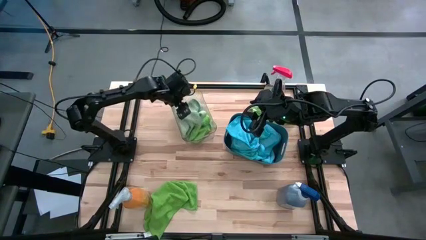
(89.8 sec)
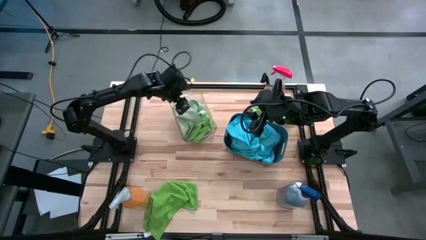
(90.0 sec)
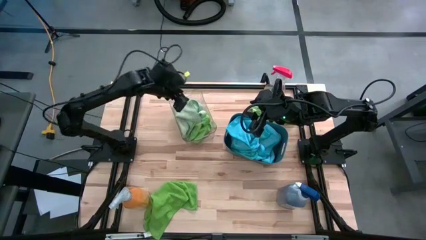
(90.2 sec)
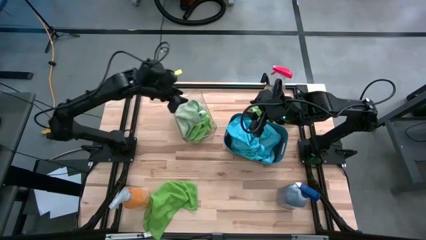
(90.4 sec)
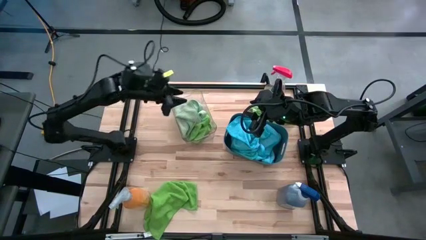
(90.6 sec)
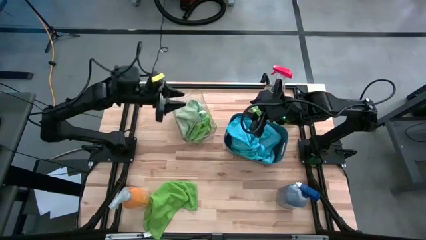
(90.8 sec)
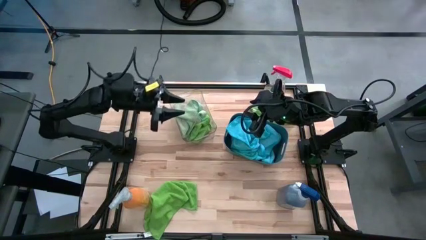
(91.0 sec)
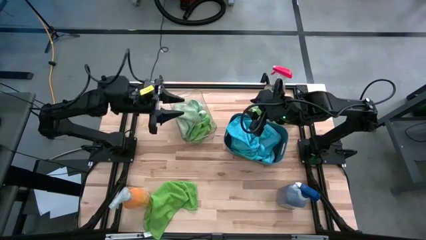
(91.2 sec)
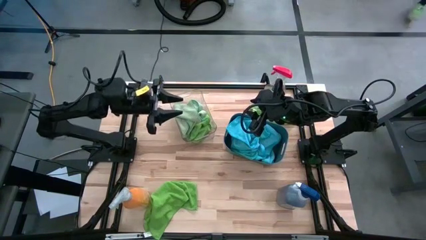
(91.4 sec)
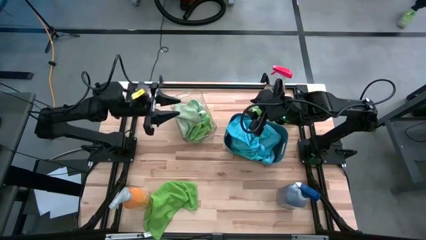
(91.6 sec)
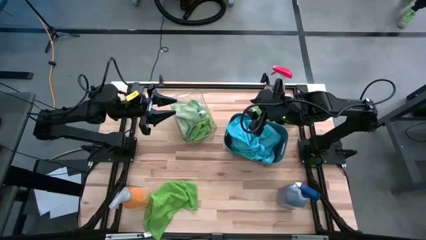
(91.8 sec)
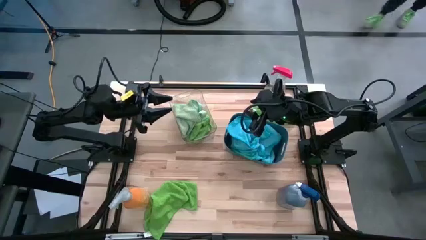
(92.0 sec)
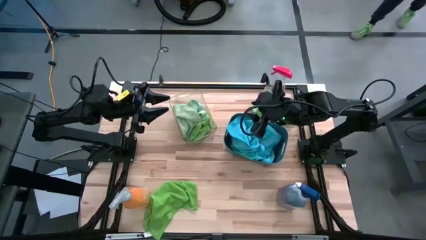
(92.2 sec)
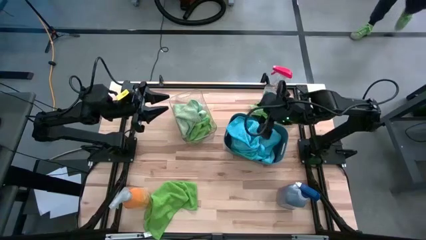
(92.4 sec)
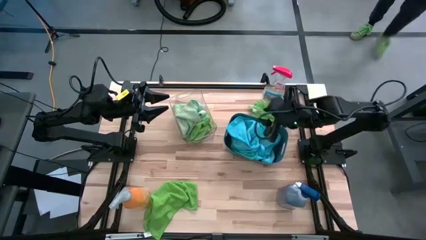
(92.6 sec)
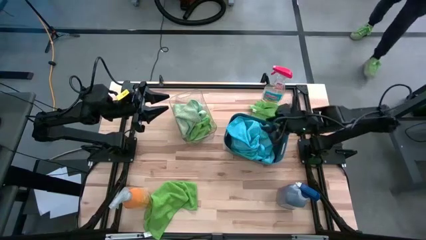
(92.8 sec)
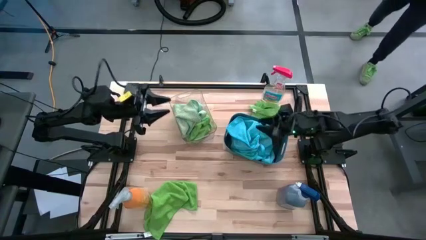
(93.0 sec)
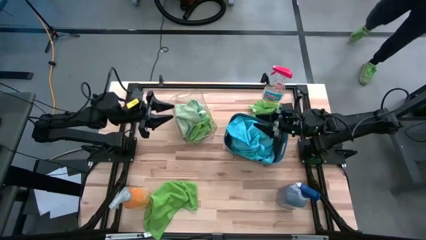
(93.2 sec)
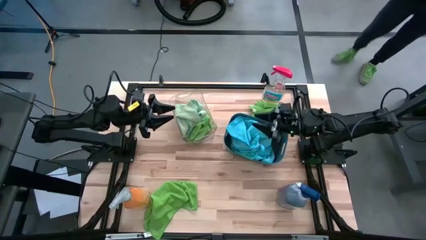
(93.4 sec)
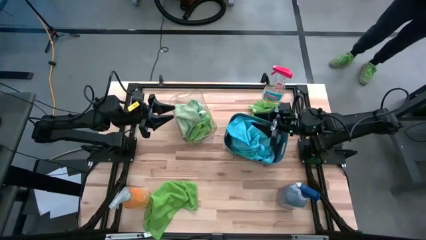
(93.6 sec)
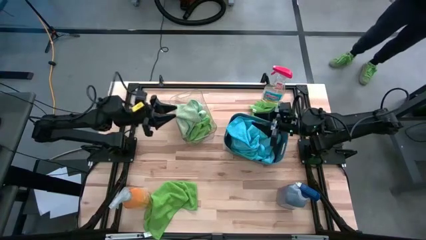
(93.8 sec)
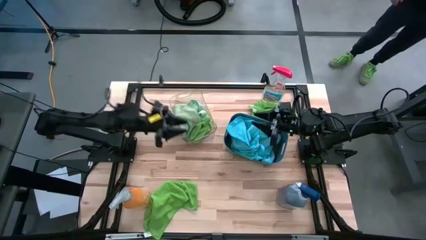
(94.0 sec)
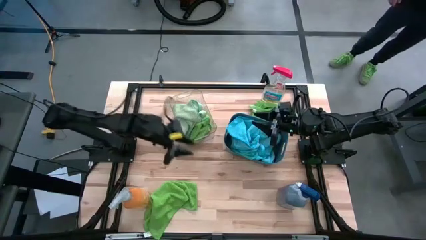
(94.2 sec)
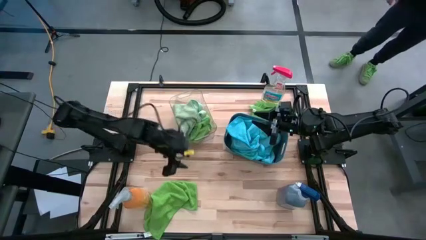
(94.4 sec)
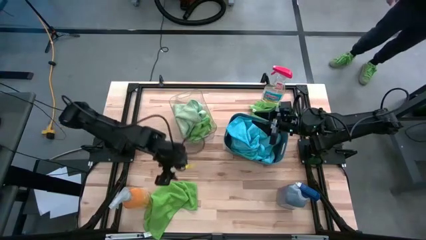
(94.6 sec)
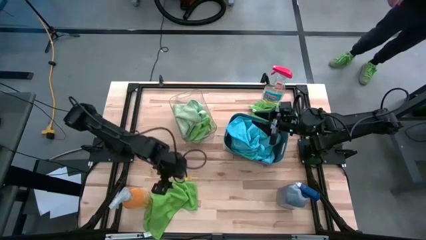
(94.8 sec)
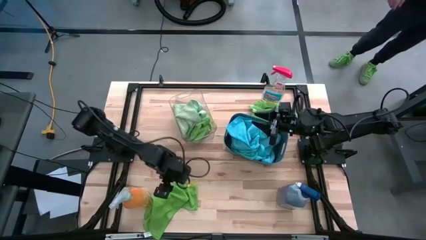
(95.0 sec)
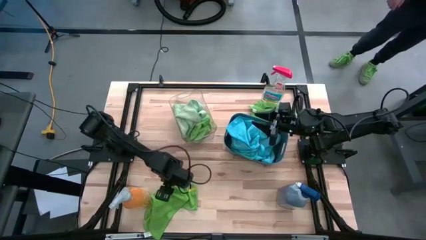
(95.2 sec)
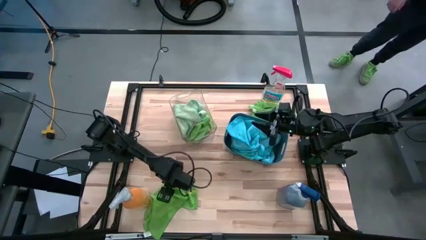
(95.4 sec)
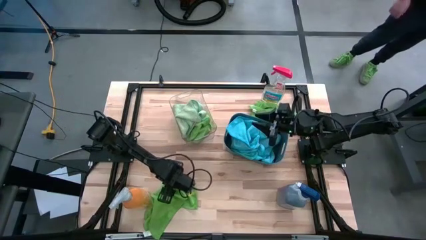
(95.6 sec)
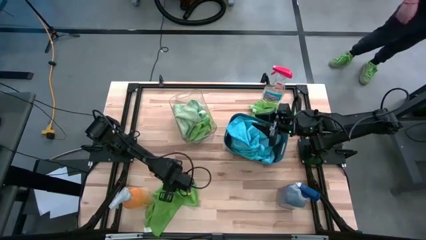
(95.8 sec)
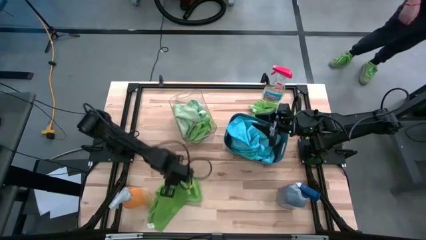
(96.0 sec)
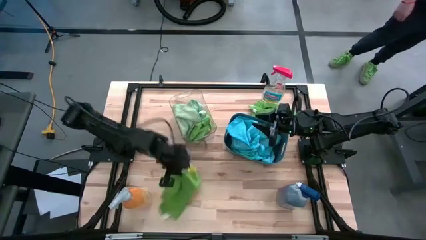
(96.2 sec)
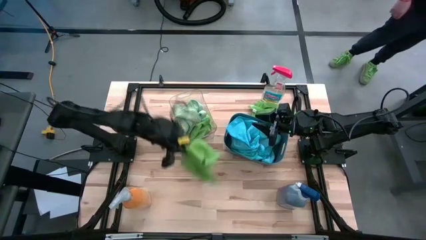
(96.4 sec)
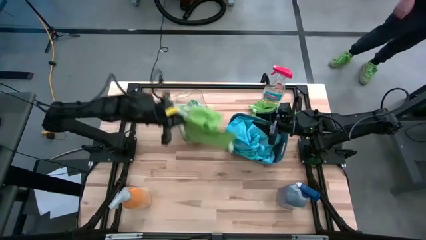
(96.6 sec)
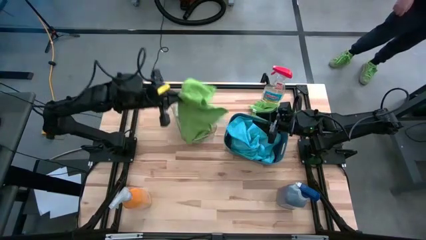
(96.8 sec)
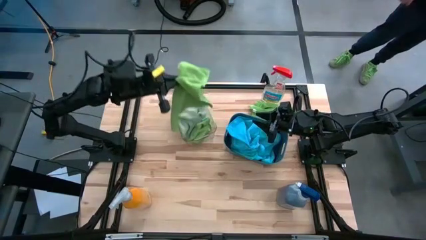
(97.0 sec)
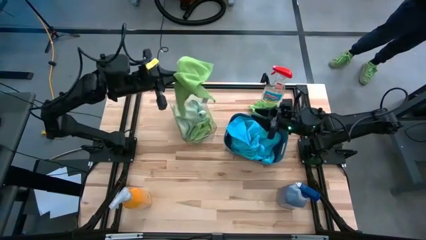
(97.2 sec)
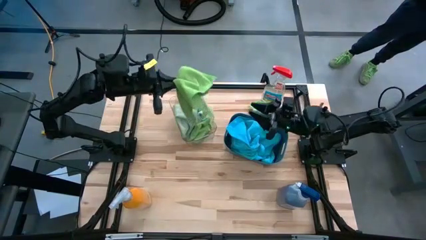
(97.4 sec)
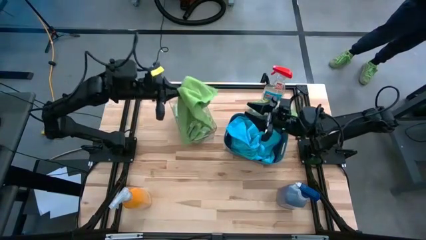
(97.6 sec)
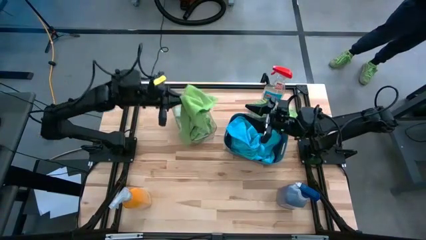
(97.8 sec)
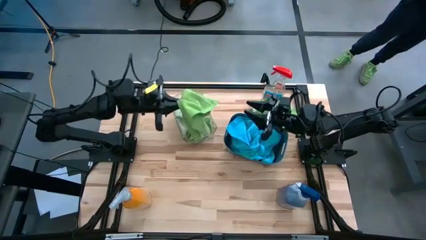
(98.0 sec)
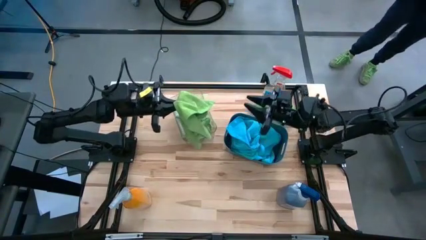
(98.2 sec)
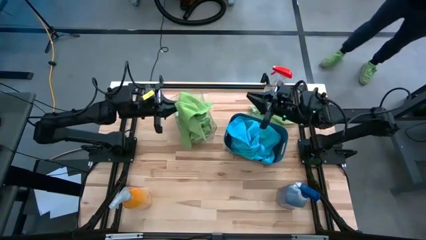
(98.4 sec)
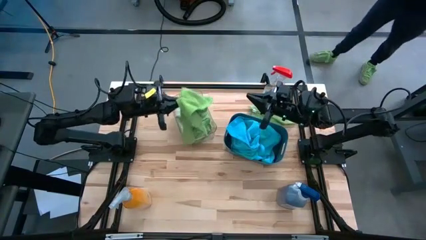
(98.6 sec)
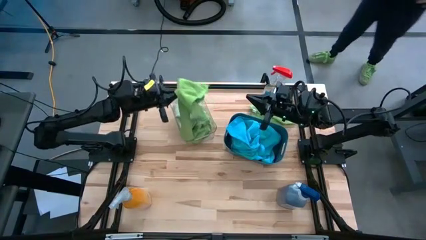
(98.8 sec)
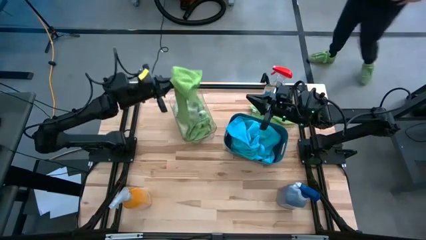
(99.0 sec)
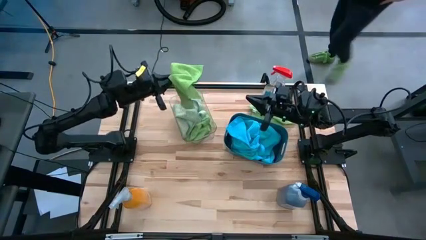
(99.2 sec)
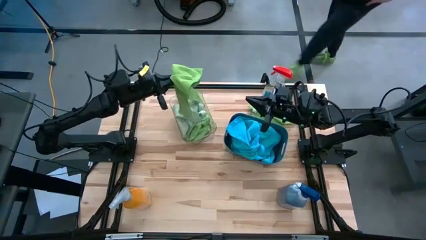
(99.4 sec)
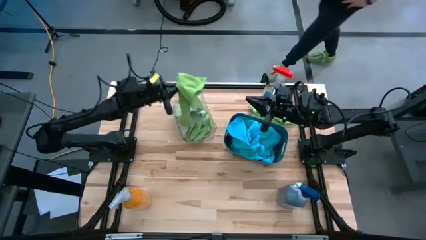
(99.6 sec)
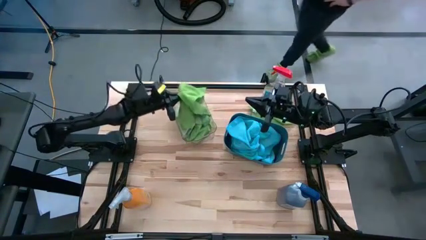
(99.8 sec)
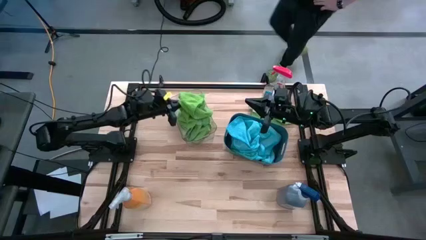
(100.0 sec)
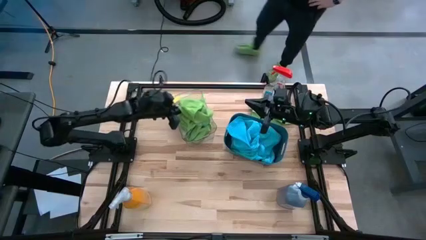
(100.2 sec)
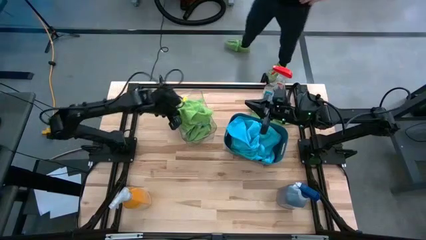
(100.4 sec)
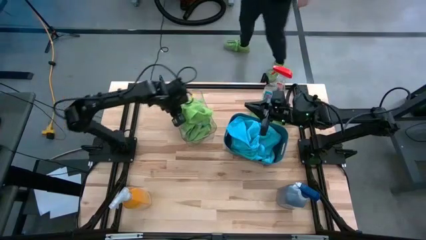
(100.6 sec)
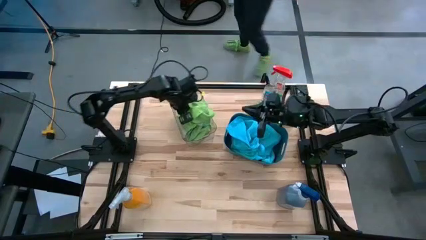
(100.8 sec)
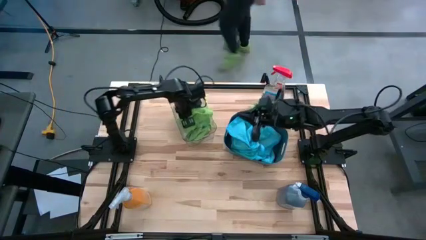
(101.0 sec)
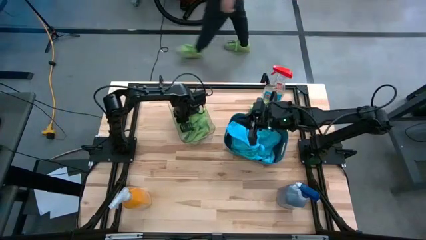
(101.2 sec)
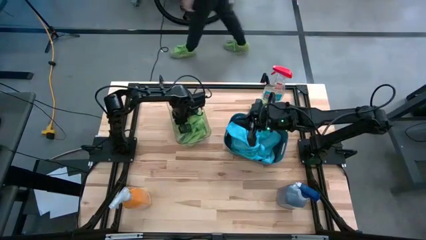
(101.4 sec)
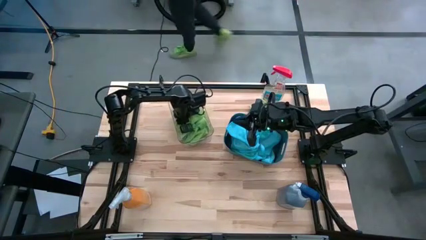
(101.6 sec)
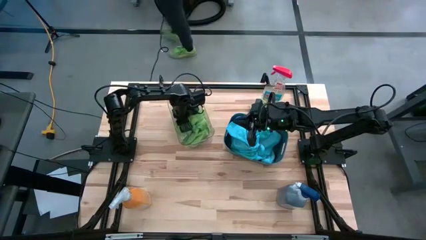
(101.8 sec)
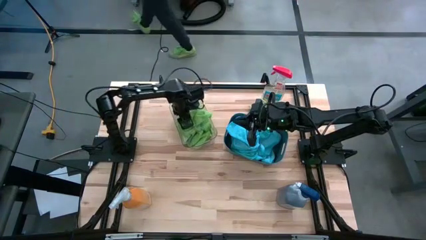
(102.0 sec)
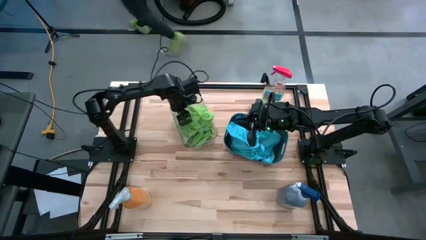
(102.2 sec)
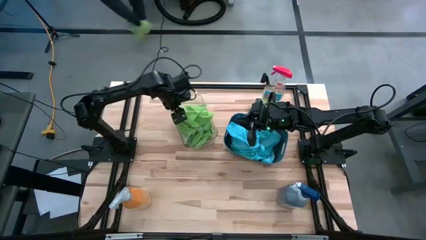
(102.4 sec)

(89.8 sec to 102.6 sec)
Task: Sort microfiber towel by color & place in baskets
Put the green towel into the transparent bin

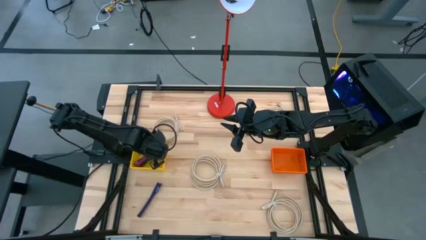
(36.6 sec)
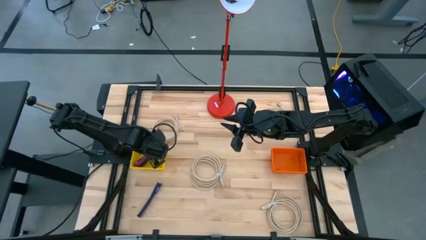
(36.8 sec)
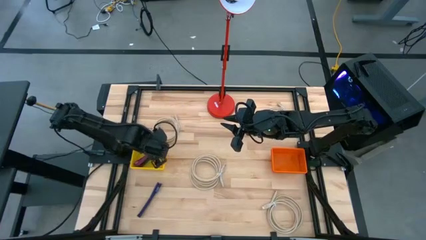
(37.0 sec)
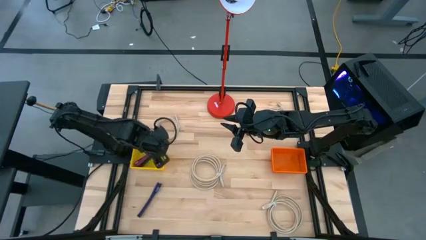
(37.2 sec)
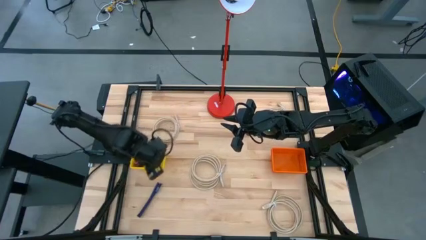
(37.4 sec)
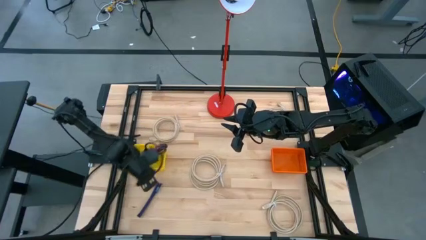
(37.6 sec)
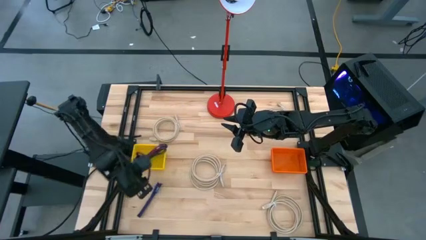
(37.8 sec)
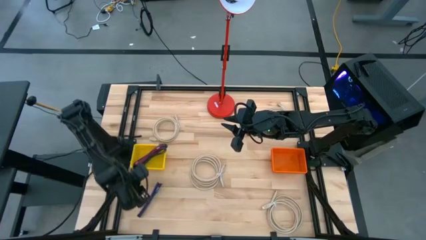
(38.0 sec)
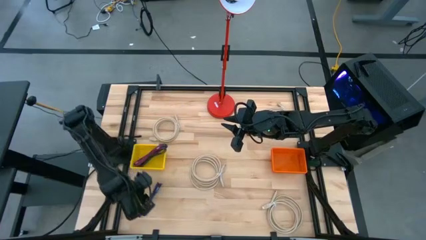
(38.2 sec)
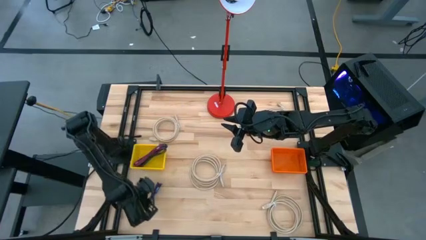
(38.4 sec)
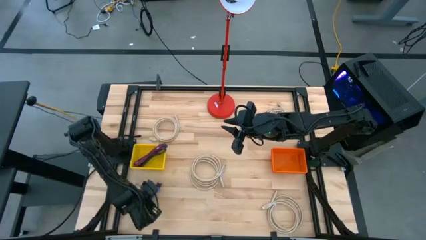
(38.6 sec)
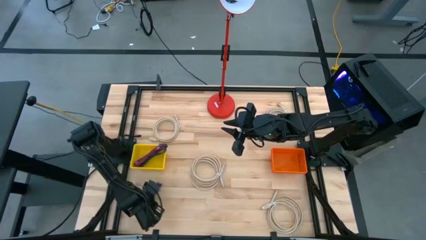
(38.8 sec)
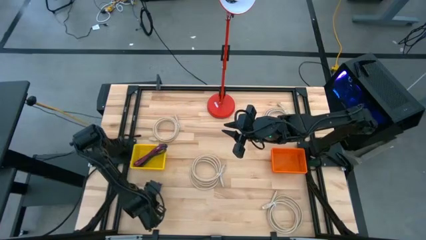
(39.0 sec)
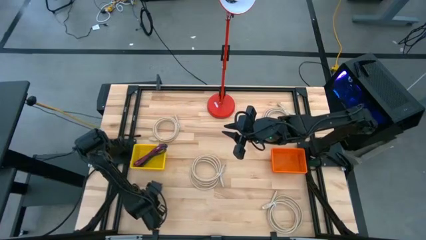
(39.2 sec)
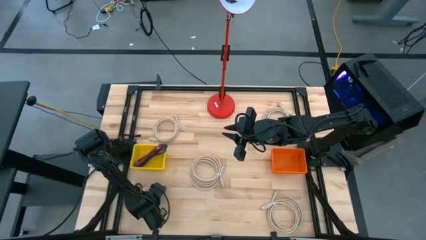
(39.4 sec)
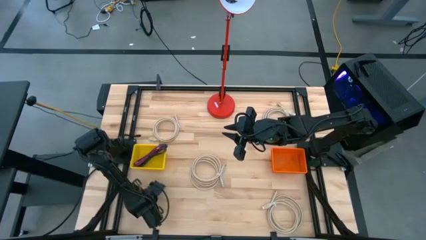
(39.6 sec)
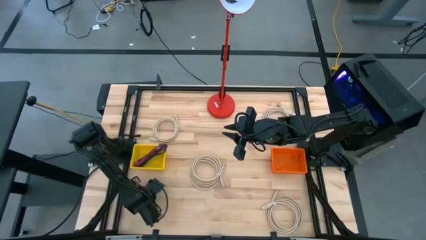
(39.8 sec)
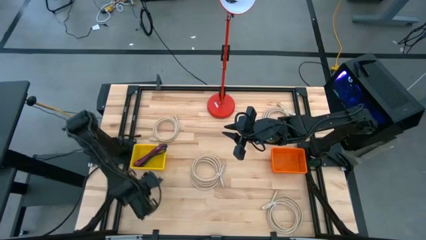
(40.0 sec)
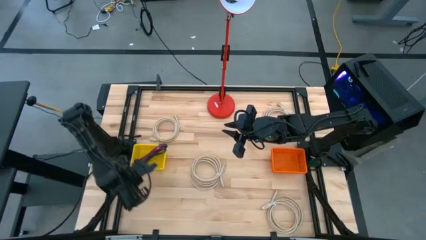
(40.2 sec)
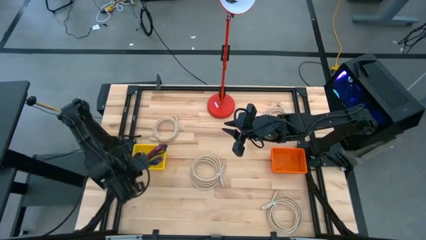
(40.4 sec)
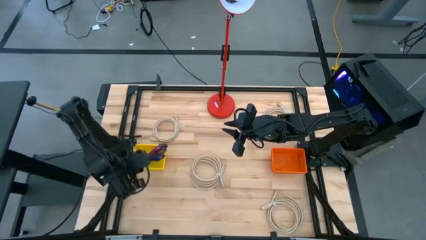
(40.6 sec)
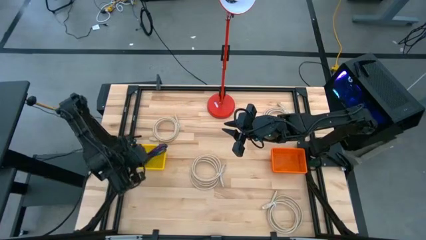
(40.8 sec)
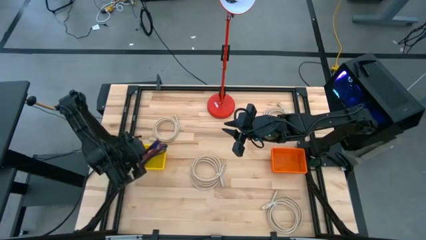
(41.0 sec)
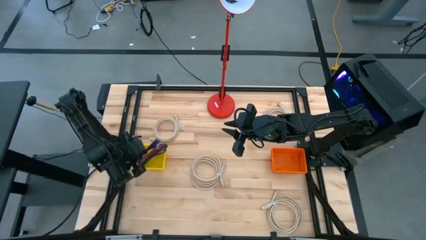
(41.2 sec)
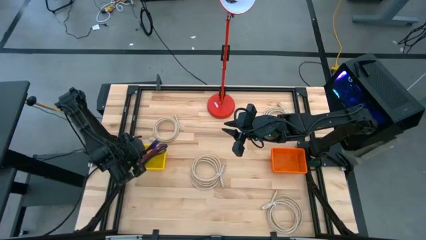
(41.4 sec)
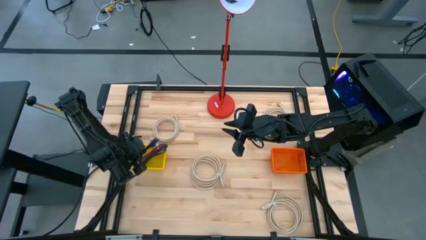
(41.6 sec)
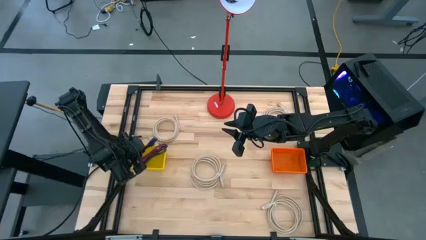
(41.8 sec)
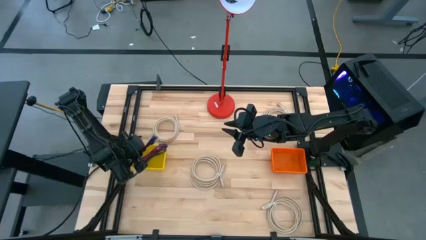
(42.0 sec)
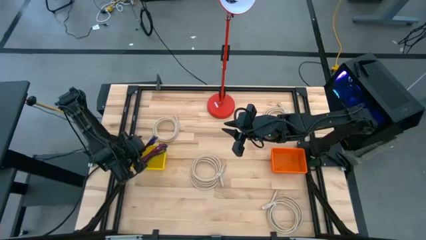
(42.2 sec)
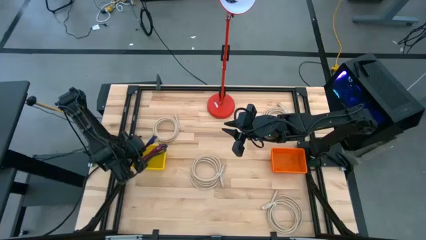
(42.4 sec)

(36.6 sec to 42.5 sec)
Task: Pick & Place USB Port
Put the black and blue charger cable into the yellow bin
